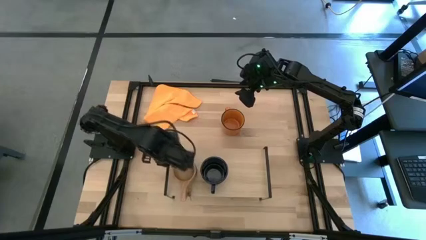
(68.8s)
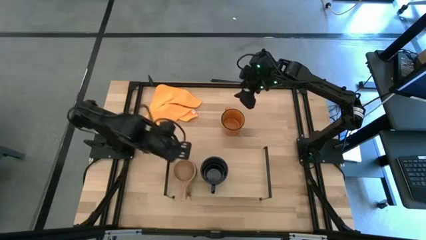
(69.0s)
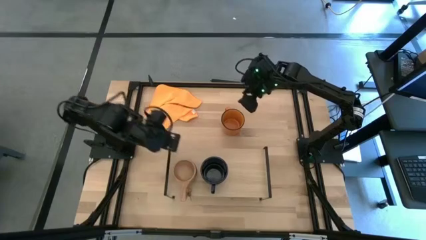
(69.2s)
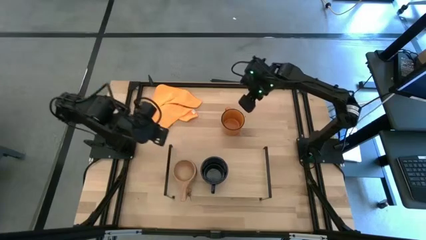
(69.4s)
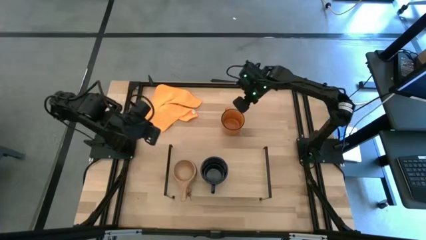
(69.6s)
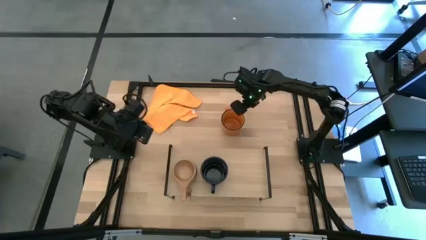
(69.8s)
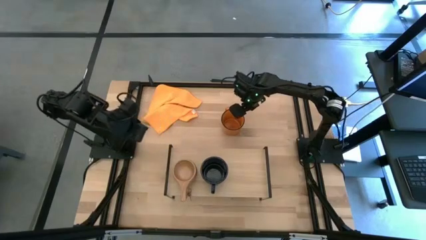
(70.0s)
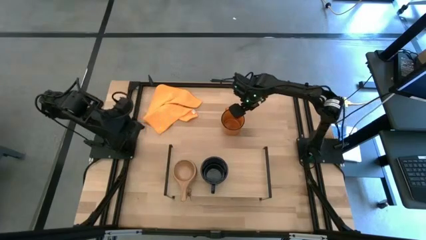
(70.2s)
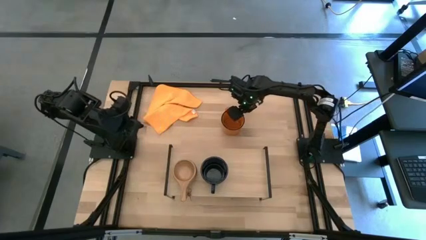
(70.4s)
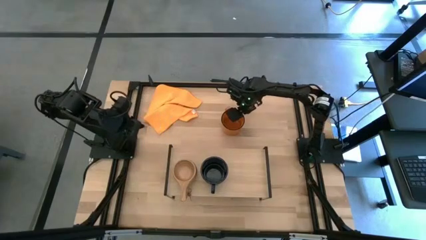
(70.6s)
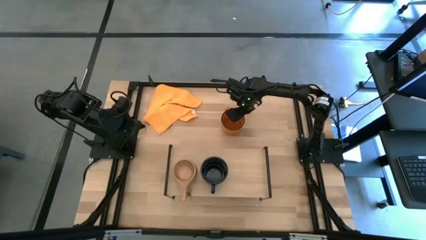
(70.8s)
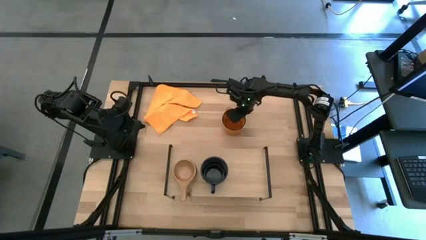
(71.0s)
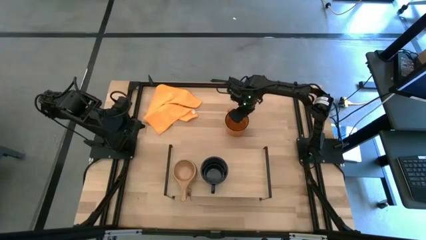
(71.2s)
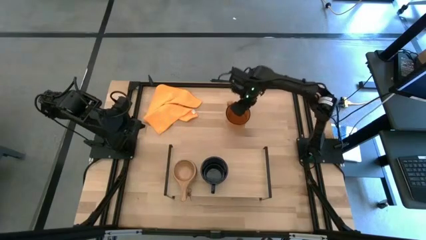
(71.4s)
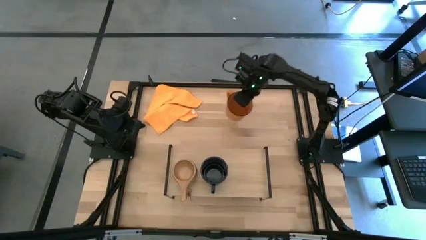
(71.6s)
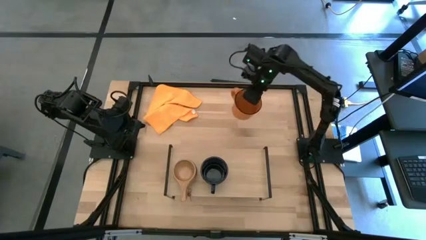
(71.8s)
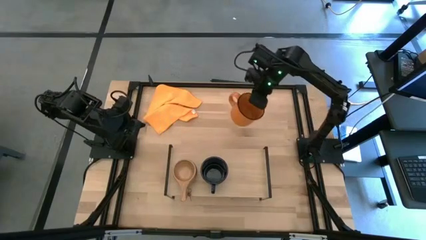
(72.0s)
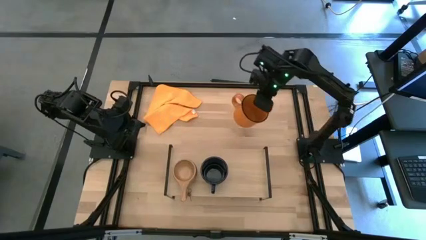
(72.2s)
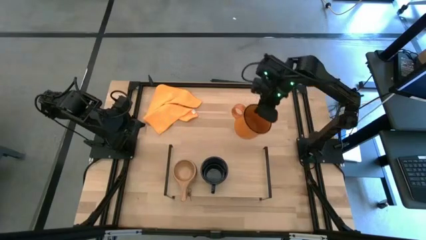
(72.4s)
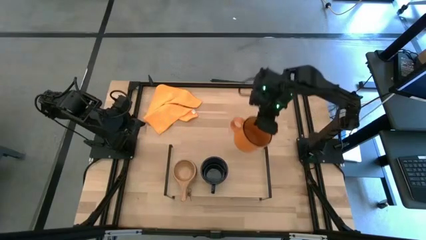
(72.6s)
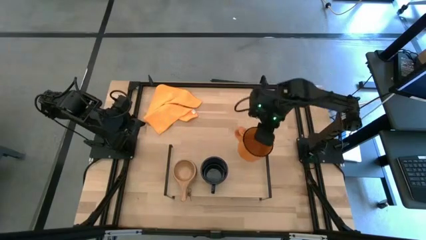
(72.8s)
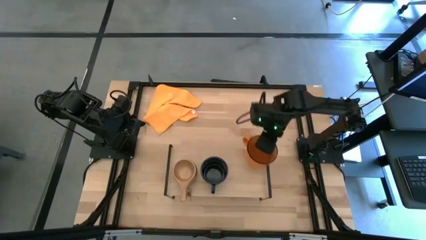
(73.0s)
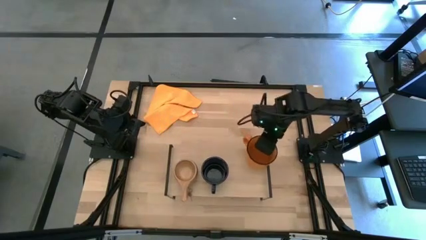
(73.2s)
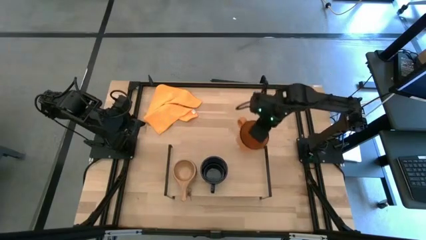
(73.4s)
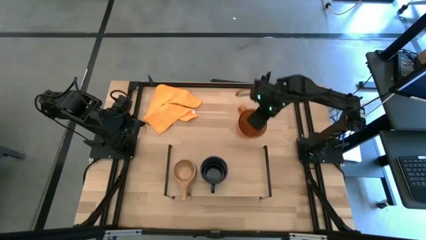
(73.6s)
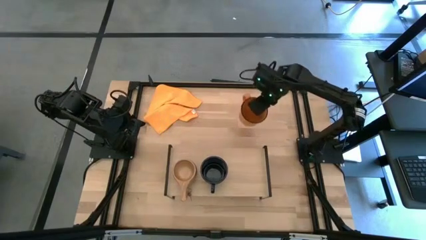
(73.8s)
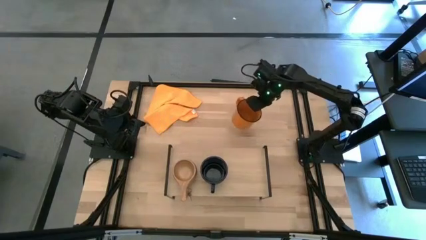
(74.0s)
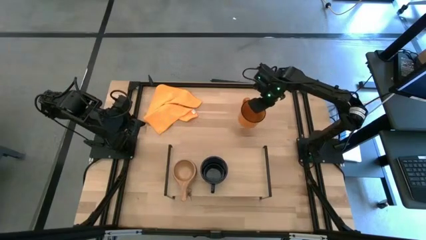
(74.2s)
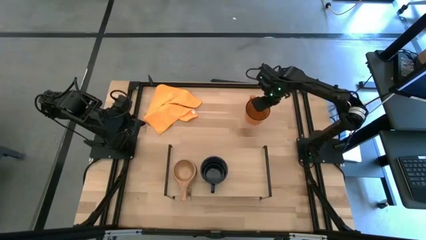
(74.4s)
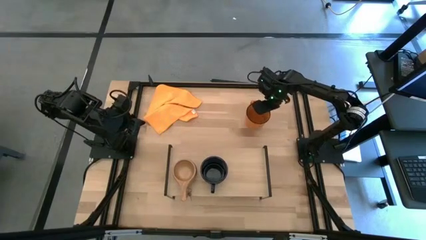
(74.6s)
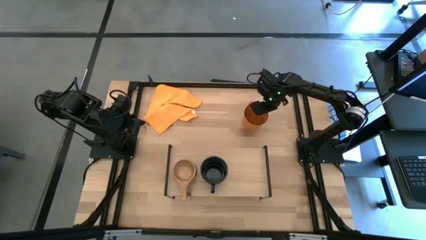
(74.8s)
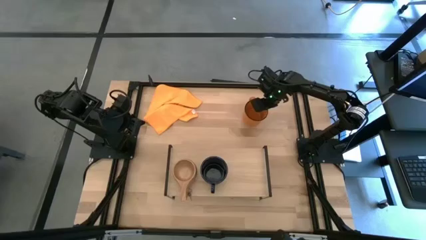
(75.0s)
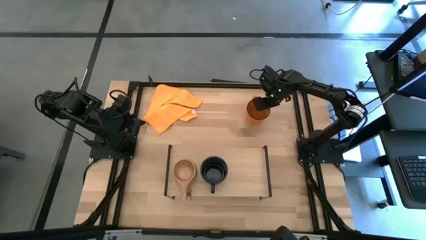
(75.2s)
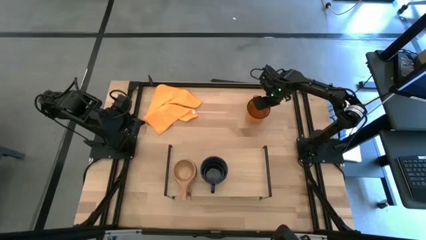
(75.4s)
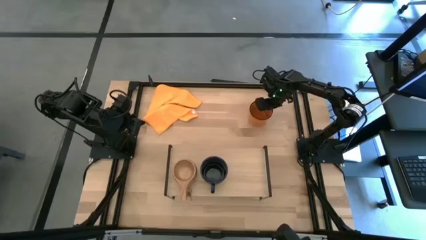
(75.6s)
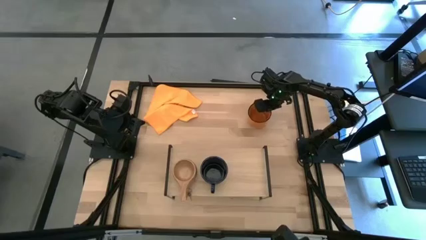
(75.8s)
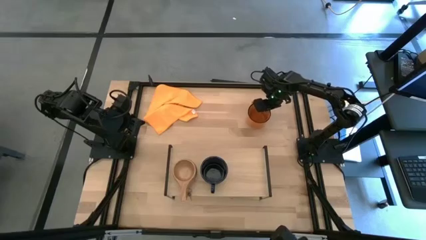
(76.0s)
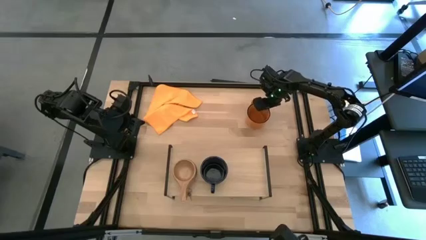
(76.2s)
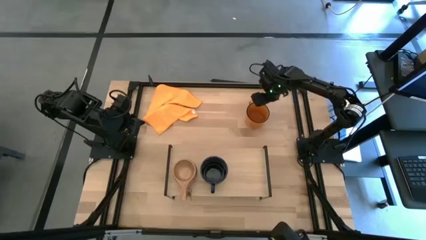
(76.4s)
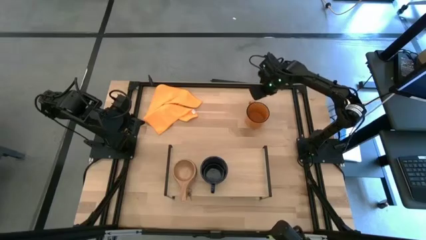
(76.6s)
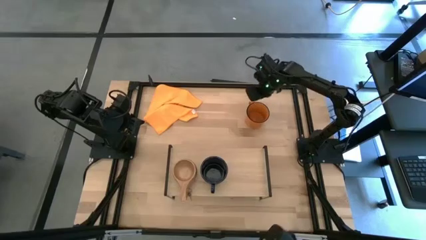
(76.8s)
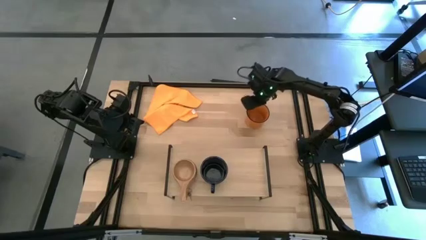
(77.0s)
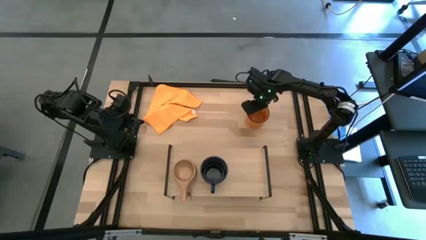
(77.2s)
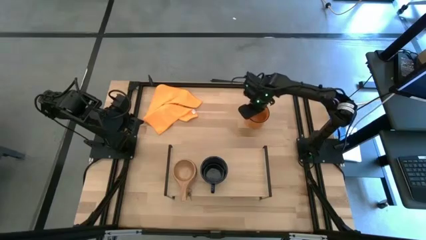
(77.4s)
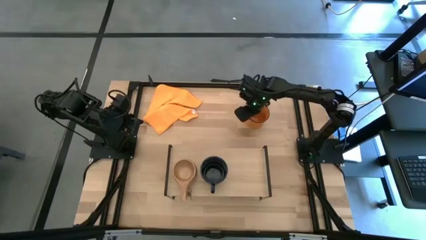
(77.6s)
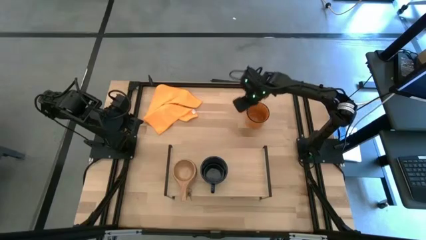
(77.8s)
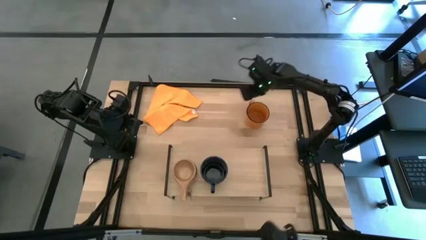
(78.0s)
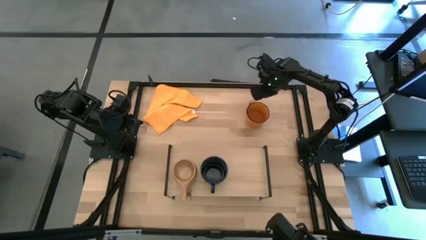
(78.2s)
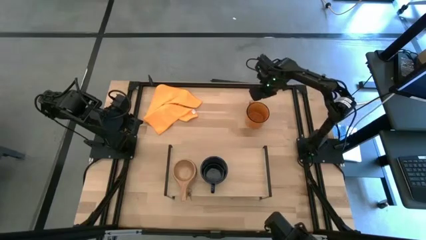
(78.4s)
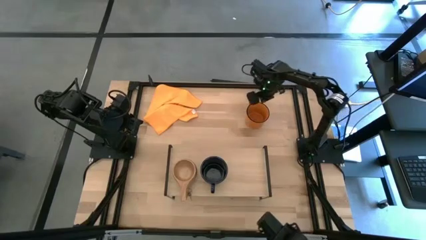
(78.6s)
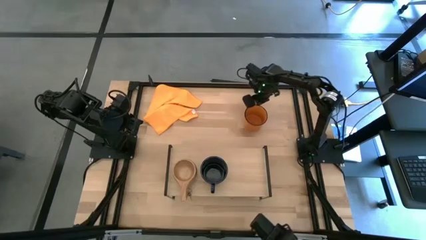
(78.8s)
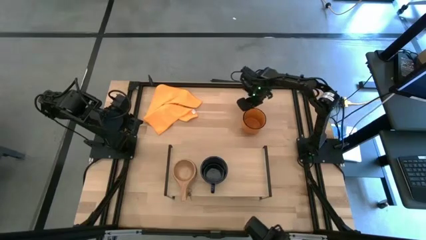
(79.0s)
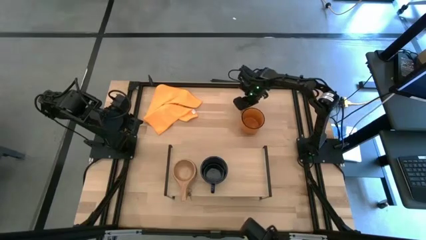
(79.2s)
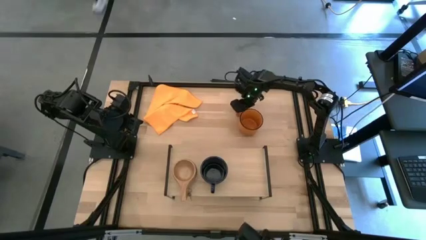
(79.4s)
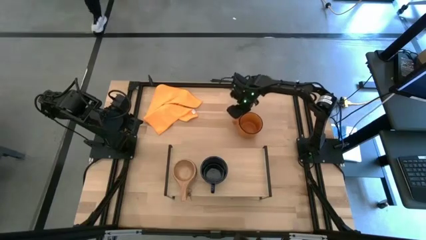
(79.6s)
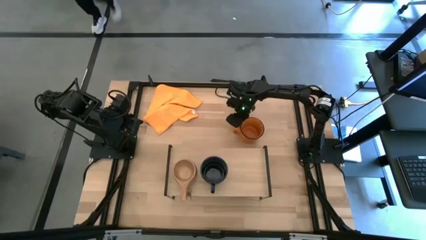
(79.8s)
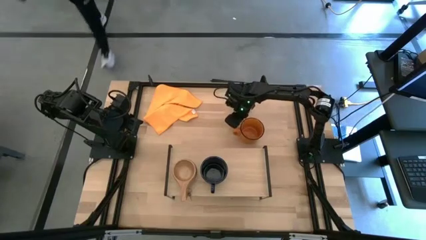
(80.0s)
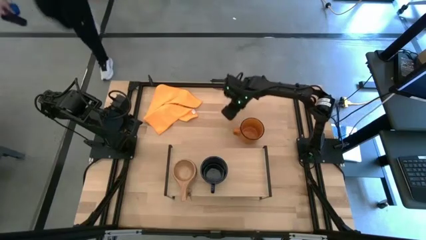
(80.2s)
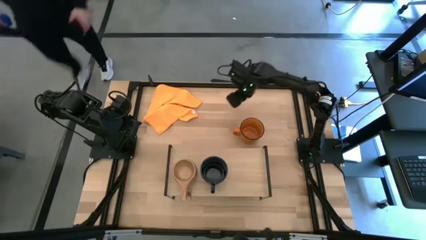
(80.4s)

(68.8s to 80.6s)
Task: Stack small to large cups/mugs on shelf
Put the orange mug on the shelf

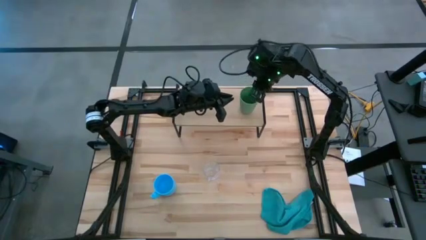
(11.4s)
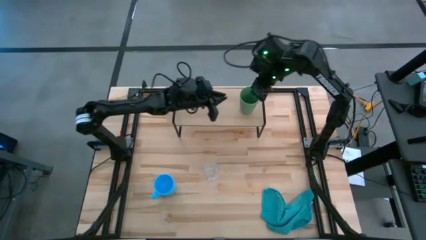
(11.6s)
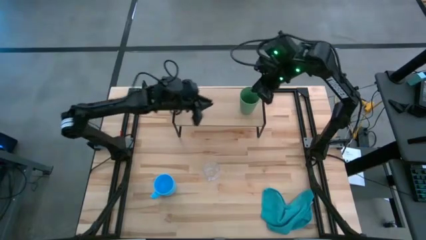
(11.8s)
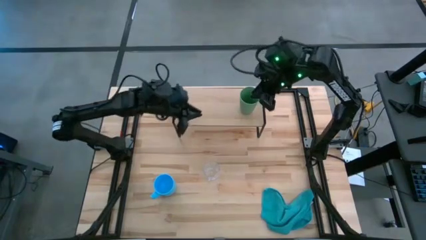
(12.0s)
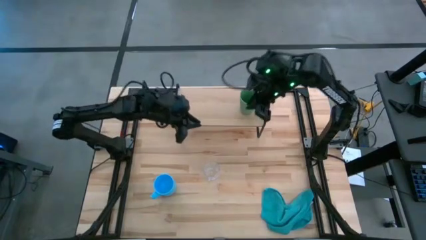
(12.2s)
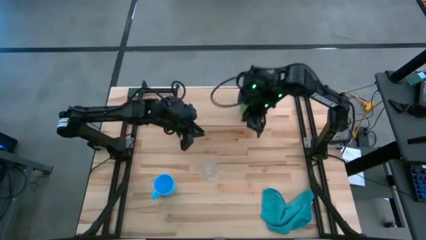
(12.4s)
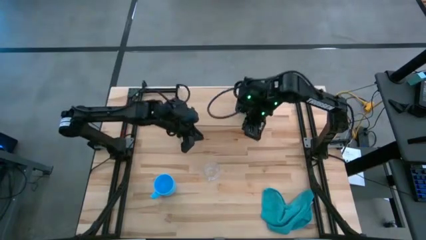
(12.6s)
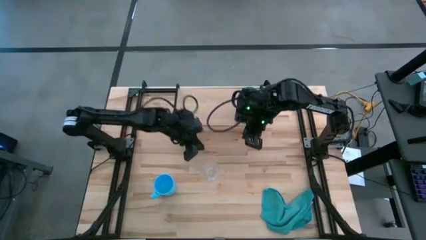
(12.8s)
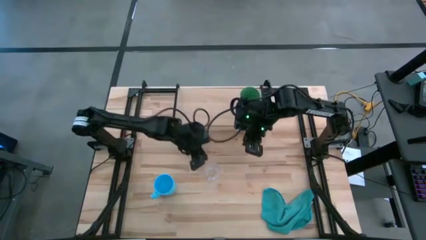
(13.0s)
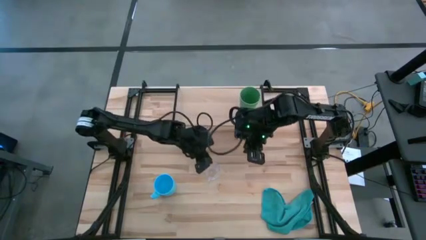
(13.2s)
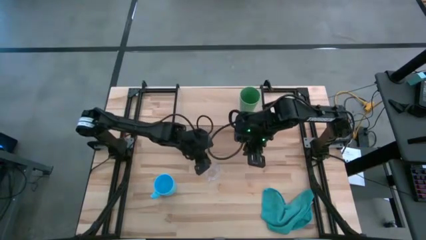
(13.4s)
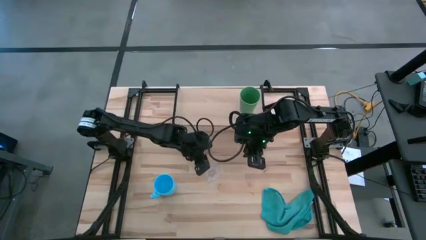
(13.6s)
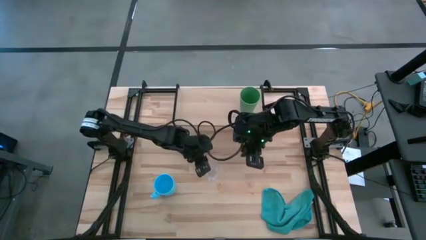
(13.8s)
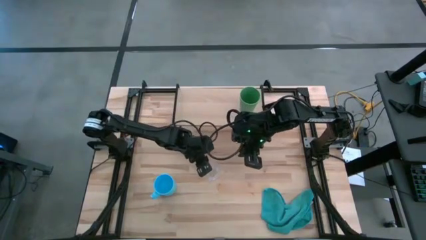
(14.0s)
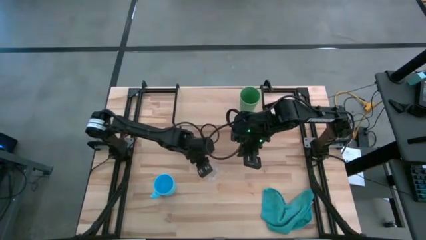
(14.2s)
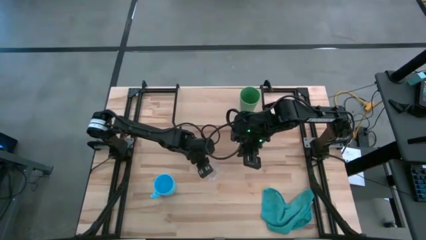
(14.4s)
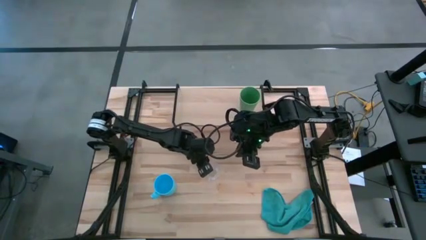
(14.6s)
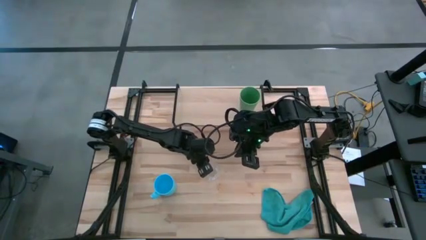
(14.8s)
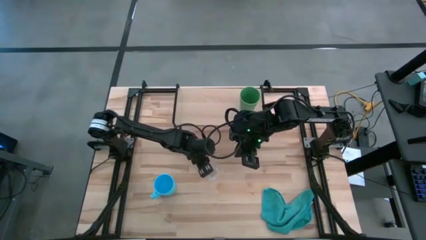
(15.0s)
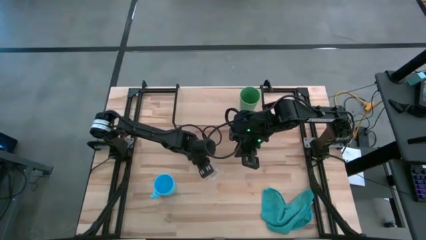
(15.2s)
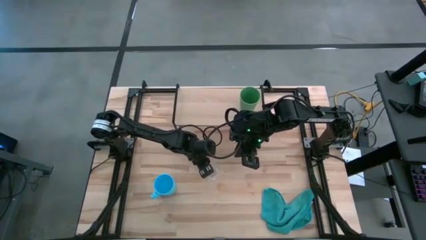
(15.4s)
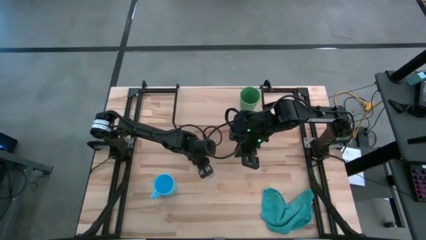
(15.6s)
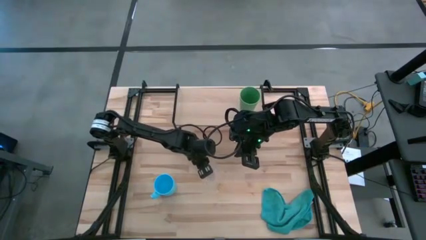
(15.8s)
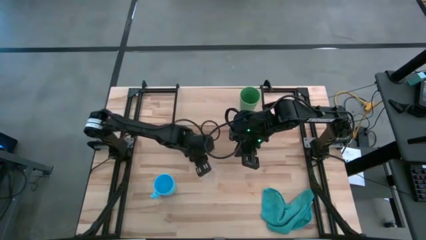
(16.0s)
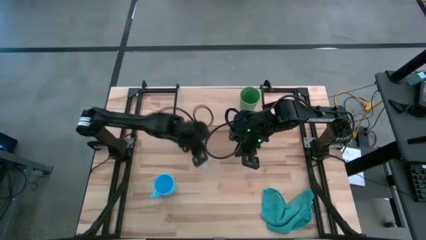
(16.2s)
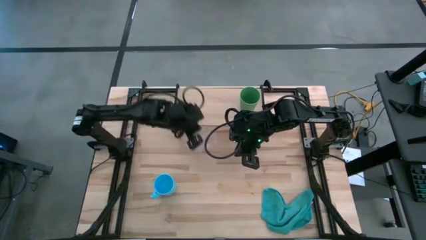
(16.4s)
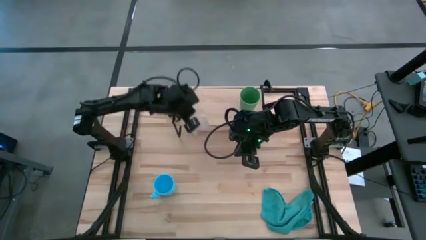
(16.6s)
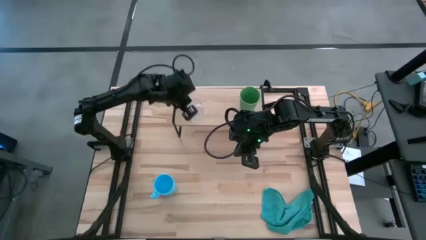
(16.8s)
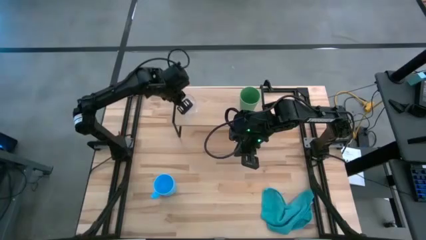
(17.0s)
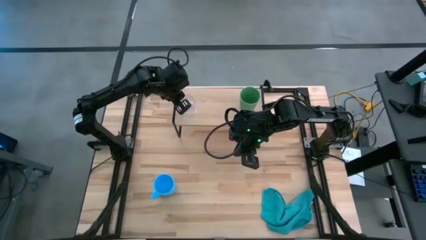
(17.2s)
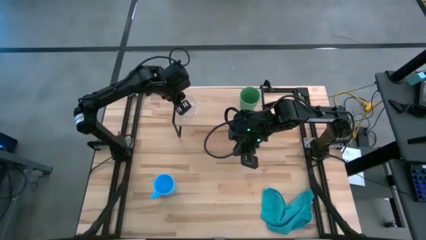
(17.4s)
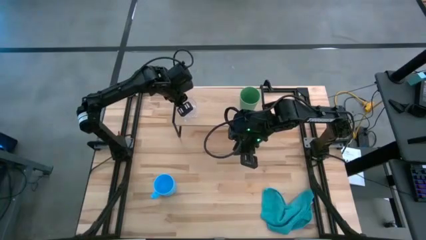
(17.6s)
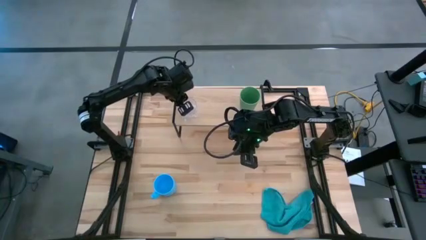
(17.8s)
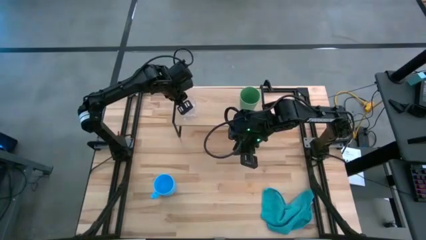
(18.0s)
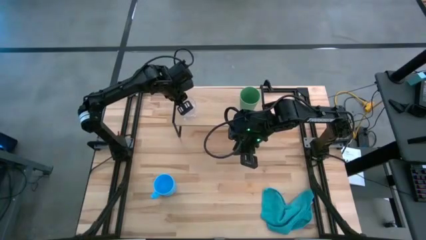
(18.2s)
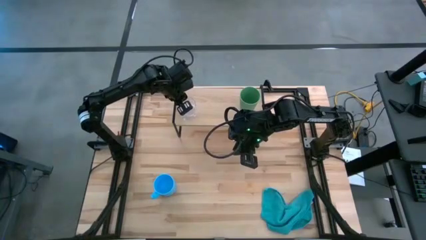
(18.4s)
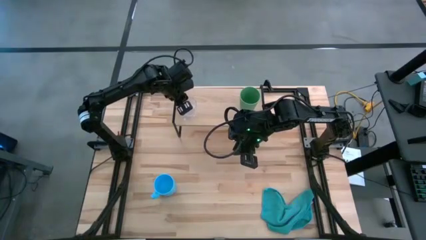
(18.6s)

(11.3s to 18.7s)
Task: Stack small to large cups/mugs on shelf
Put the transparent mug on the shelf
